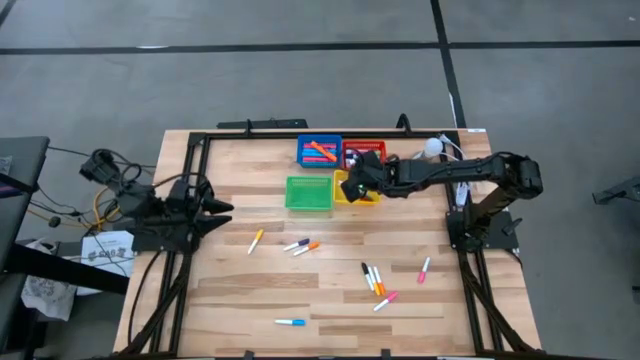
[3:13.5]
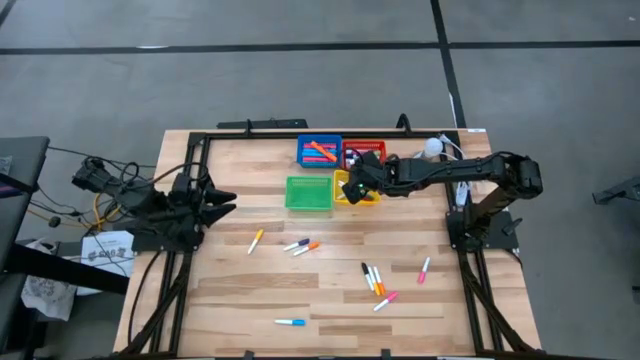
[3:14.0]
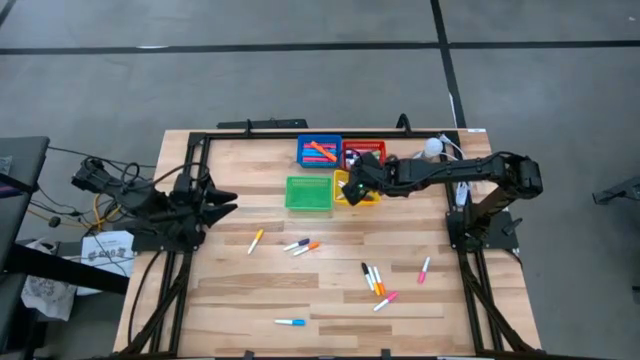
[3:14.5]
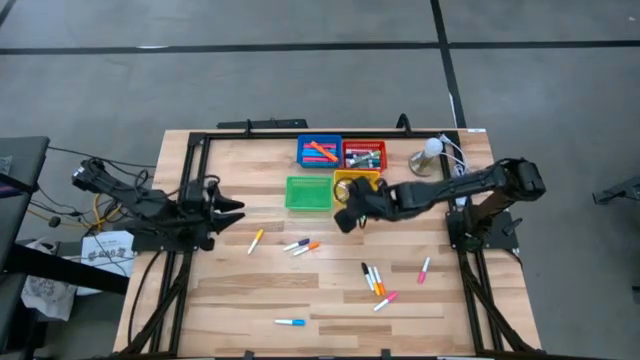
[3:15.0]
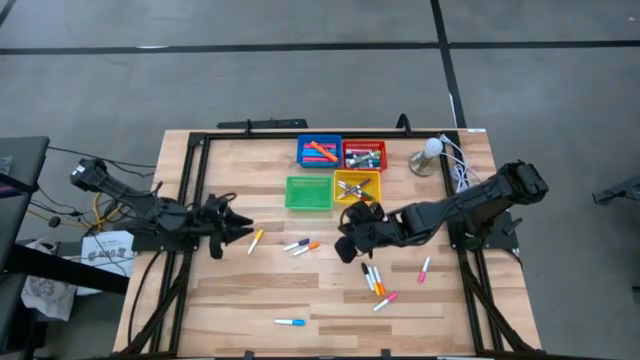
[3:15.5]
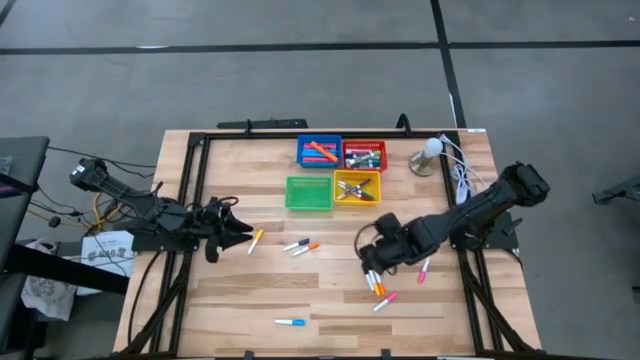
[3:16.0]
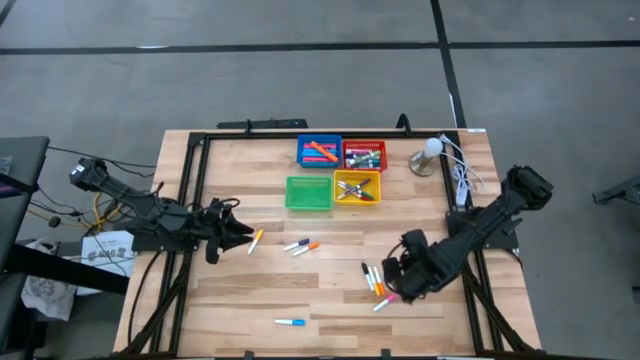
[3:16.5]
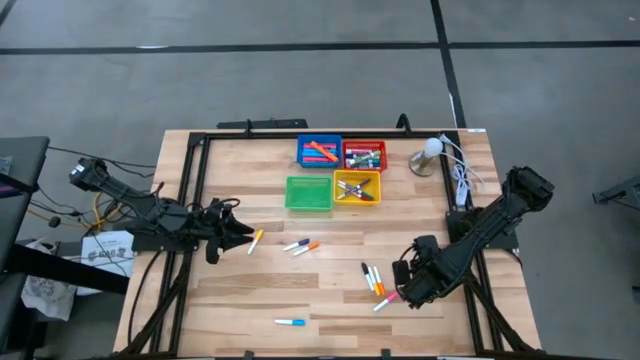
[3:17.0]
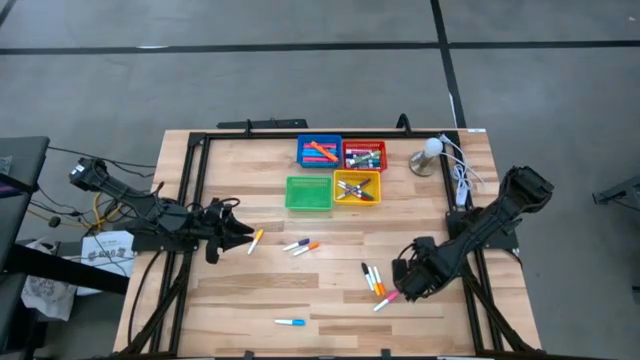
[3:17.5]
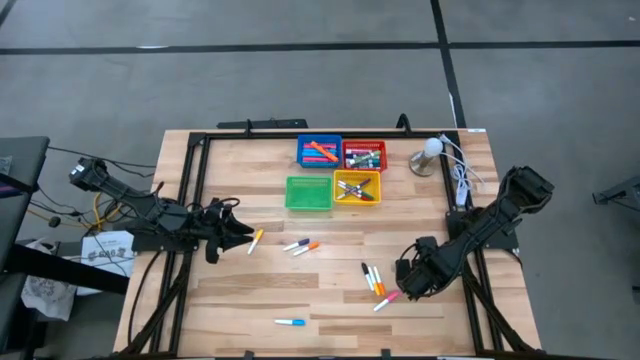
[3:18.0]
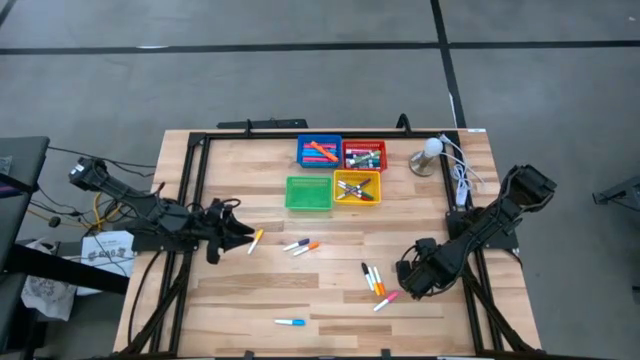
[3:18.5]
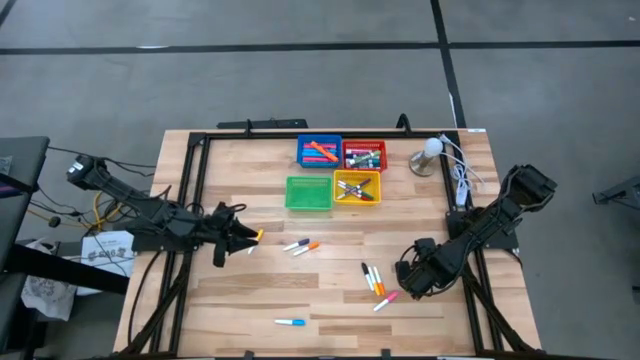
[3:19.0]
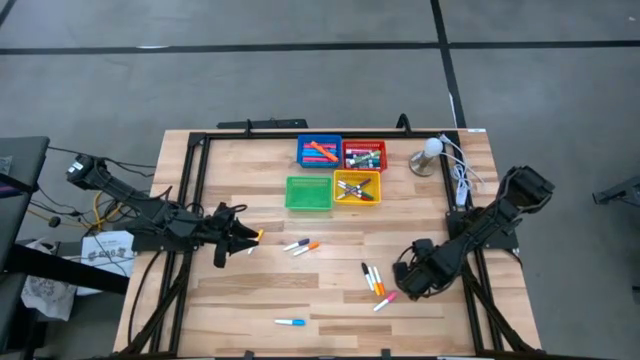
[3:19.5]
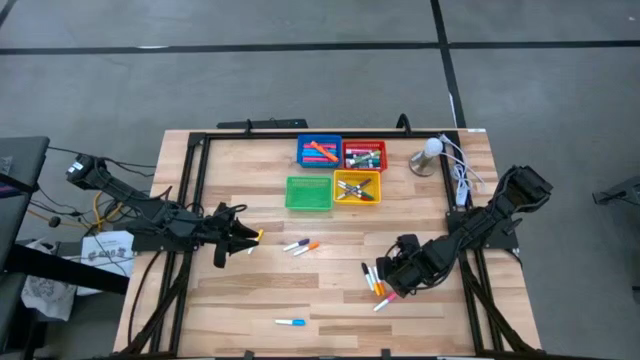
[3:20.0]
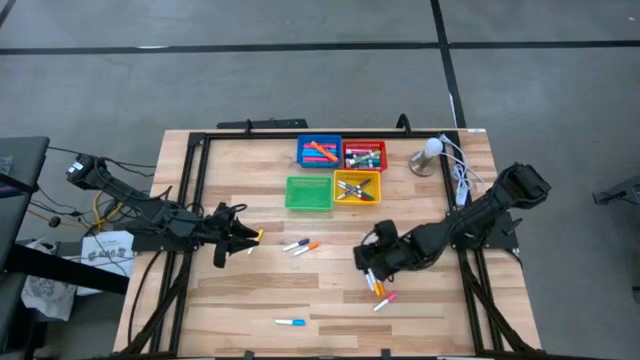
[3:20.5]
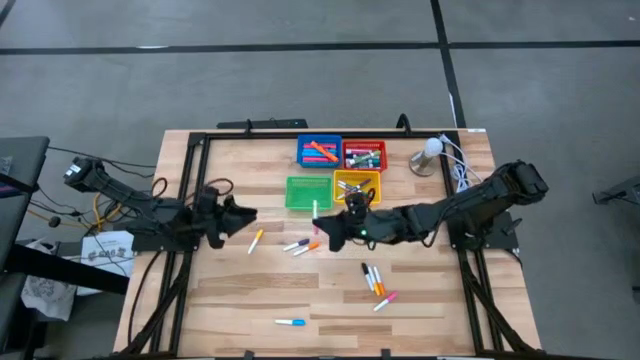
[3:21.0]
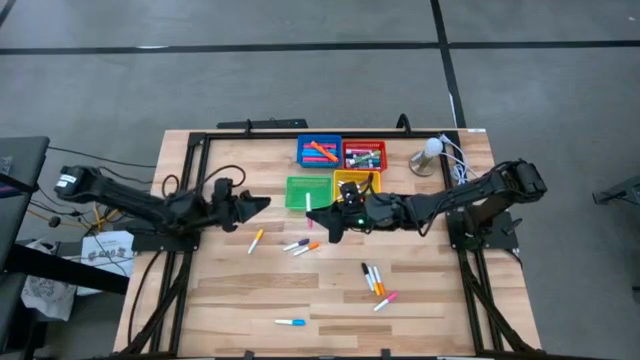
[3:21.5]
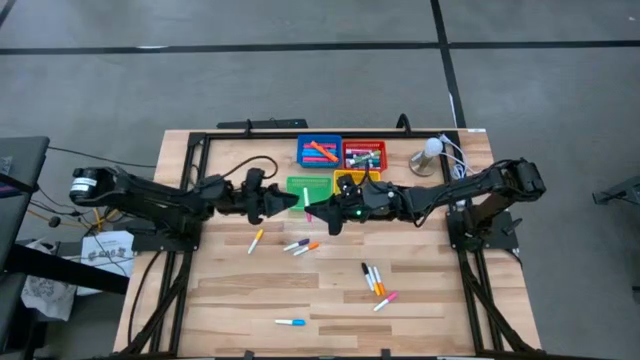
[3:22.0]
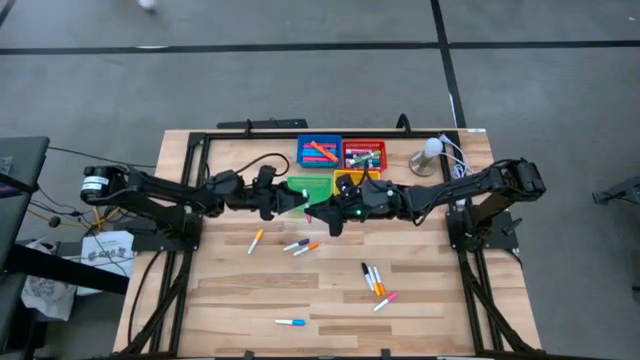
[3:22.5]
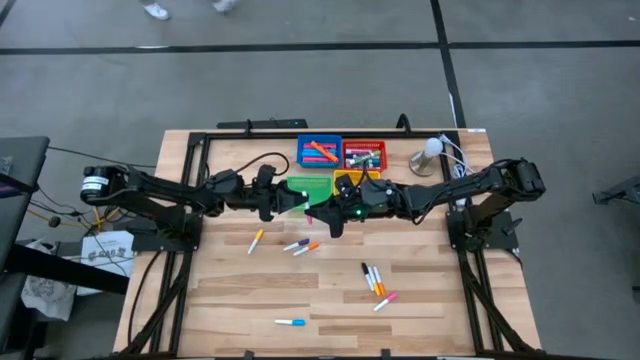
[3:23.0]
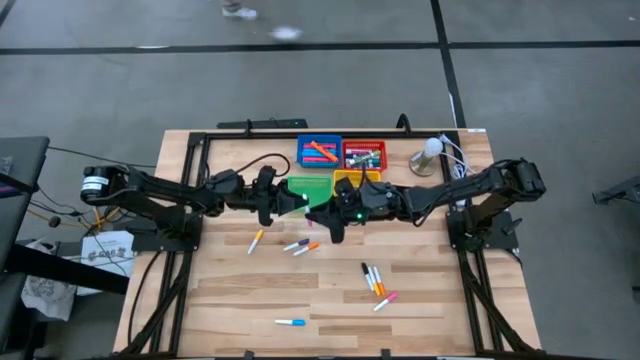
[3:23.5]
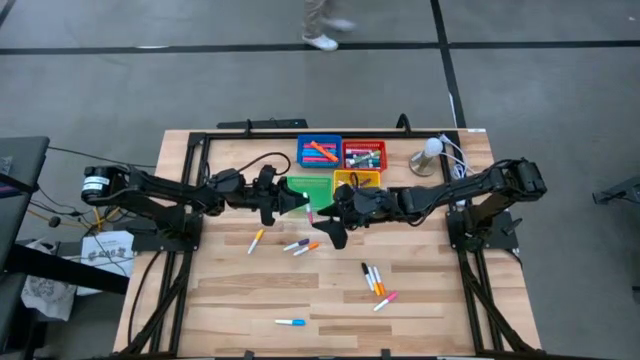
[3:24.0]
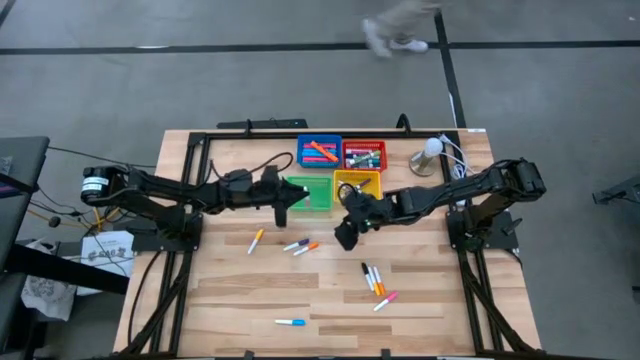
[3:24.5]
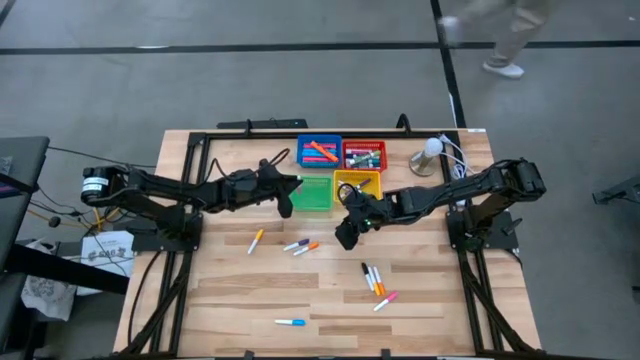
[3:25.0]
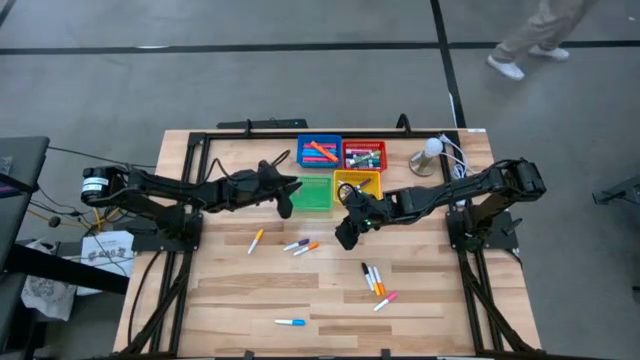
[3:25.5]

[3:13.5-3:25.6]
Task: Pick & Place Markers
Put the pink mini marker into the green bin

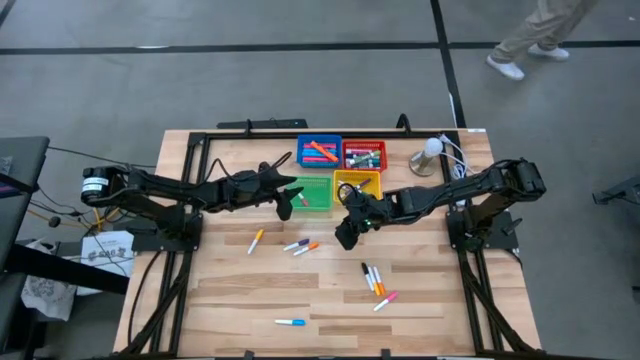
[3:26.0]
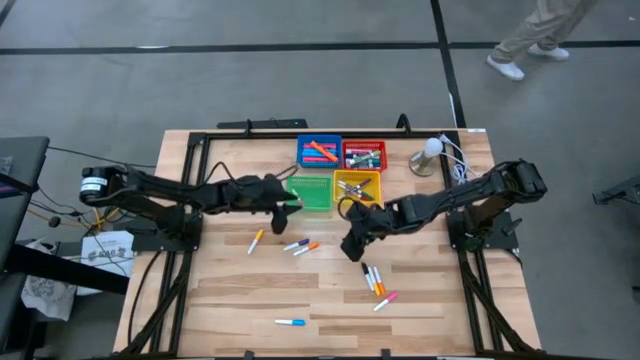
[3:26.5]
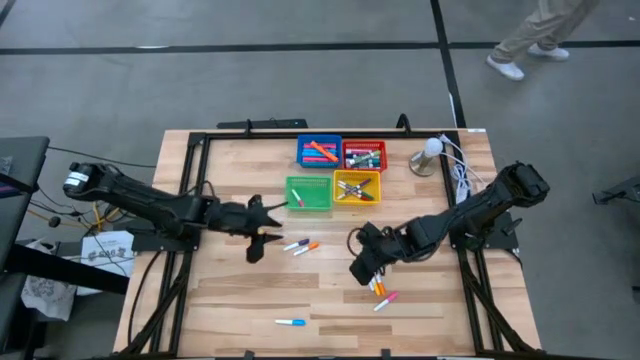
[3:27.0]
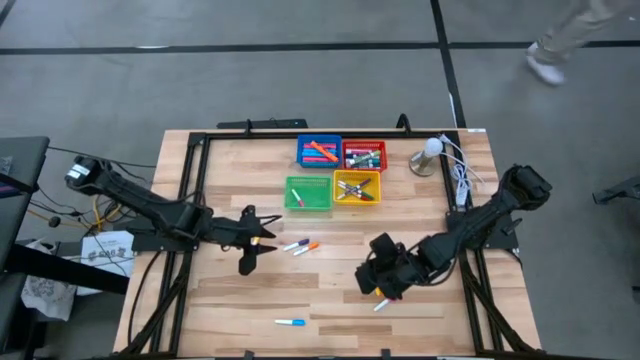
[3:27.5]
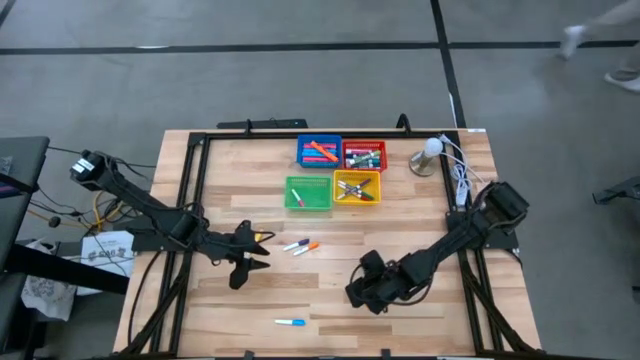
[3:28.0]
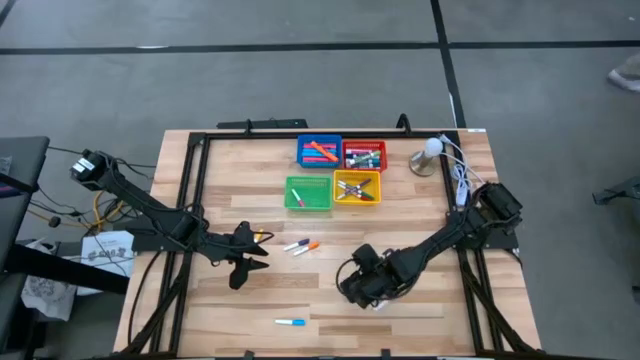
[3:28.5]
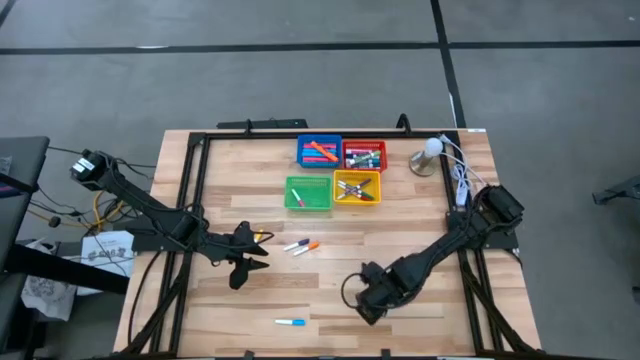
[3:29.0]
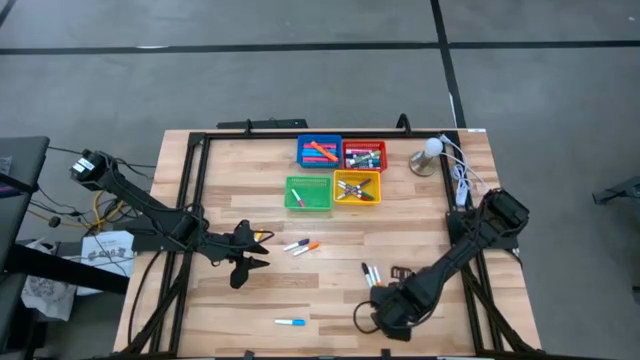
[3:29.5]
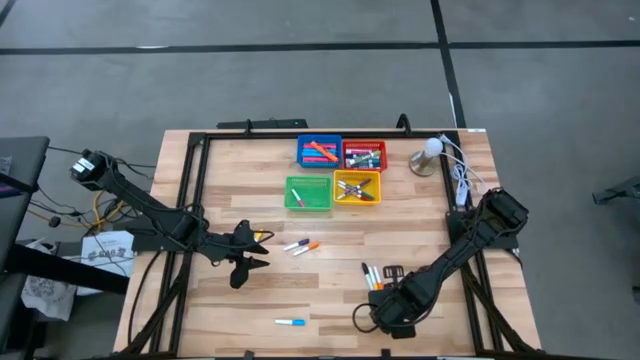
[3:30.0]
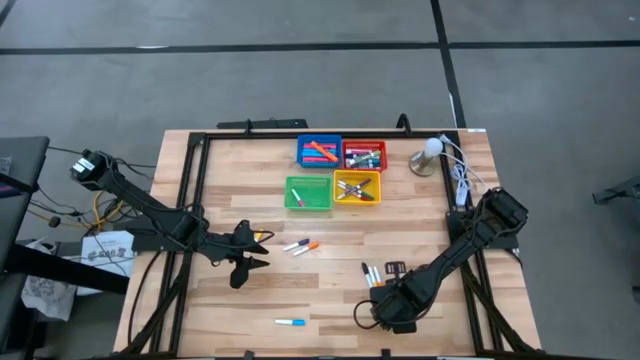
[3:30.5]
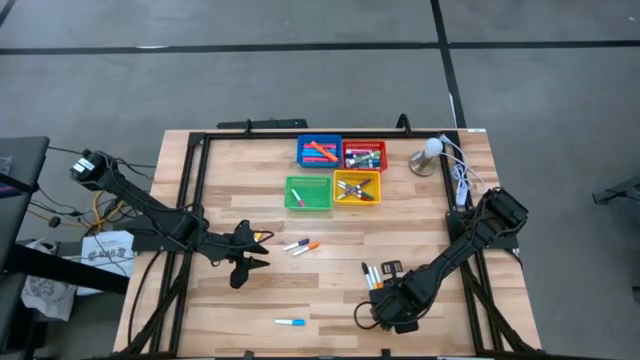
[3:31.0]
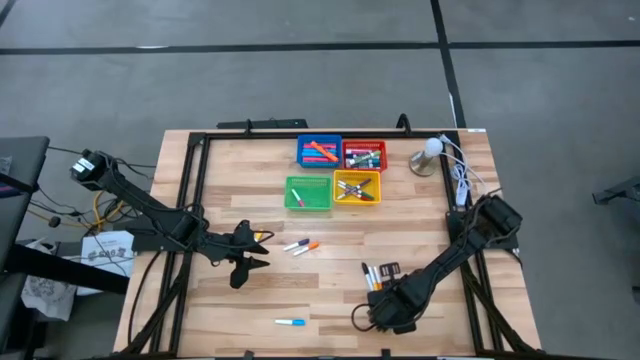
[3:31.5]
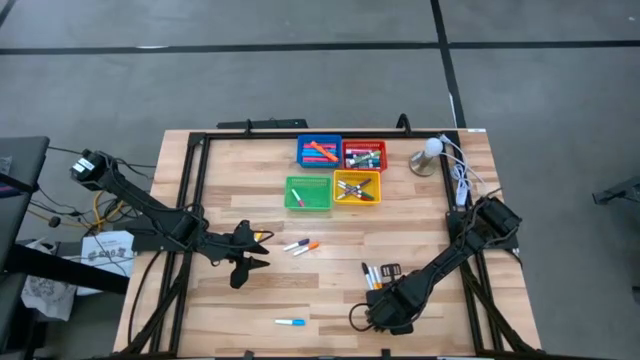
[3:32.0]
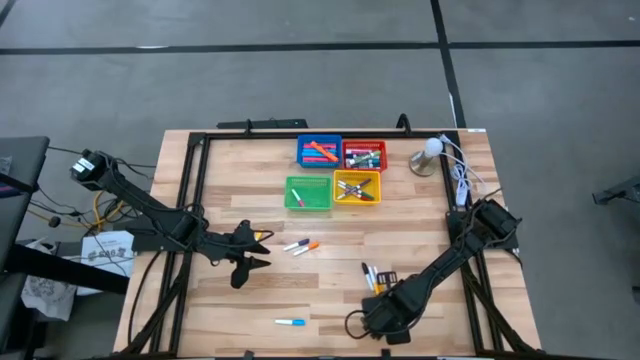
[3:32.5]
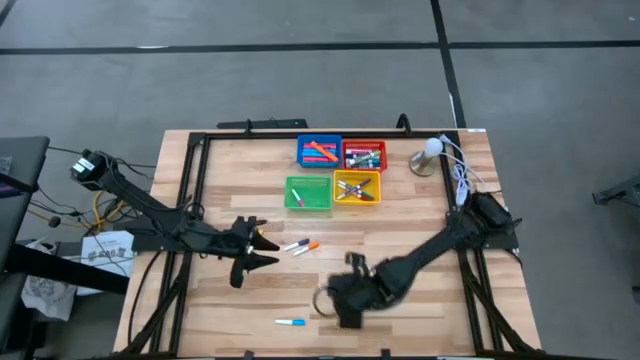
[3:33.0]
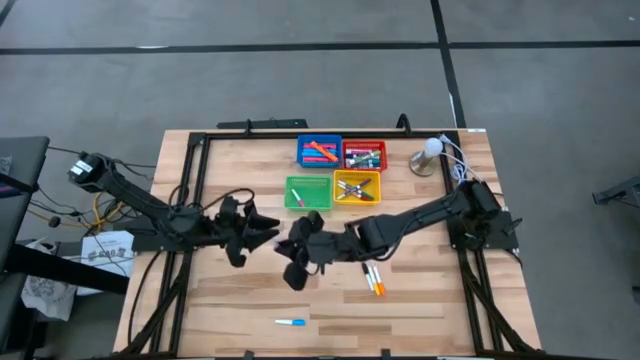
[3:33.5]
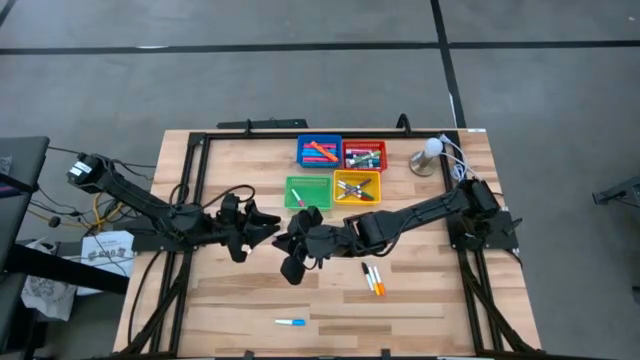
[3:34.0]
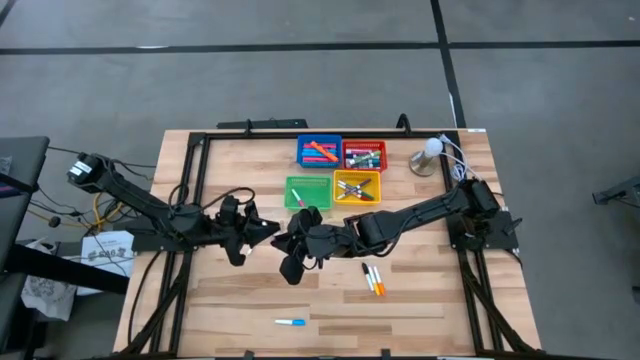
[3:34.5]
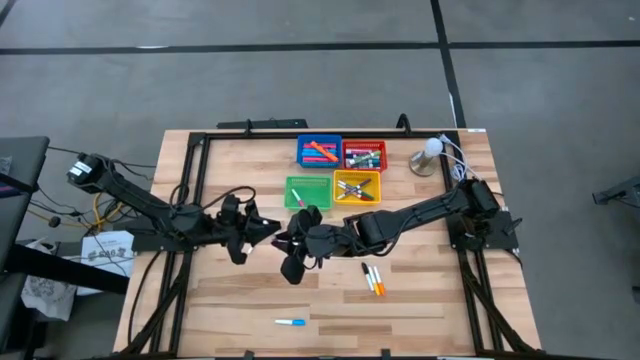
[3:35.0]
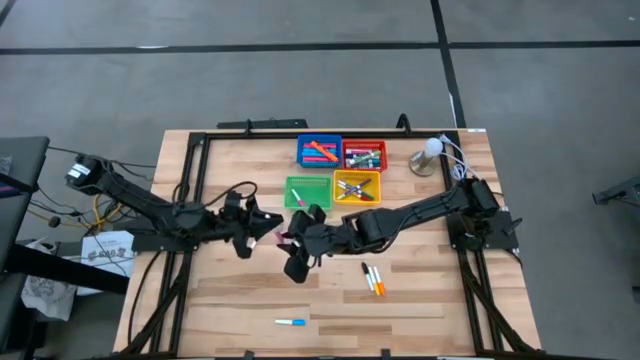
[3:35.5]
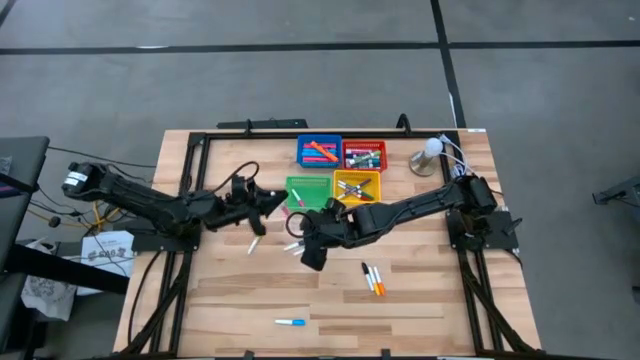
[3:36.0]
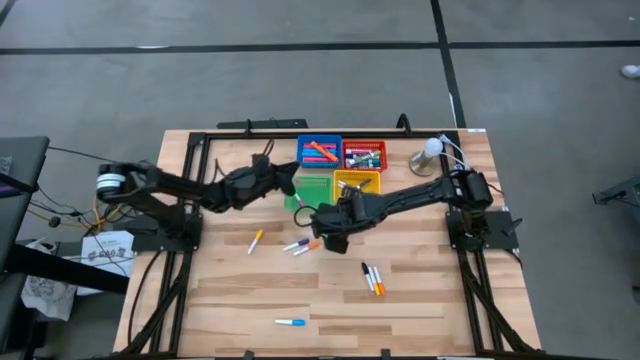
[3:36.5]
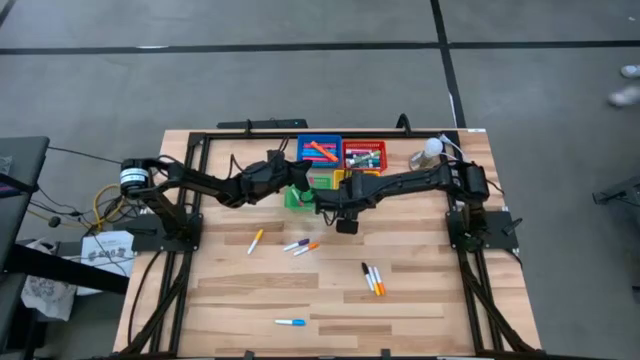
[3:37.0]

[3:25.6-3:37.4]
Put the pink mini marker into the green bin
